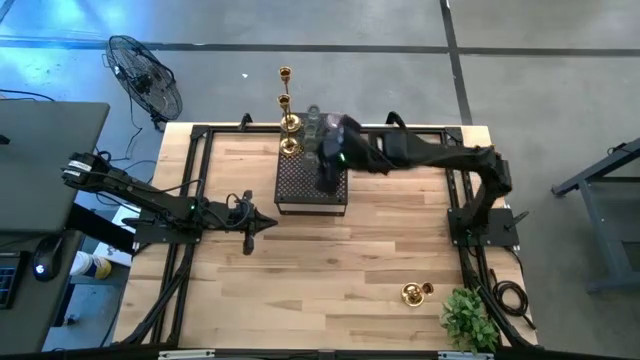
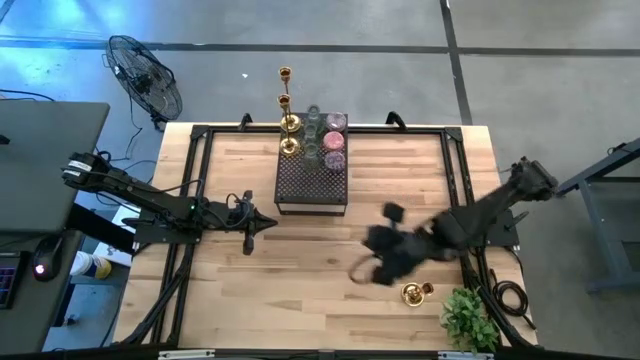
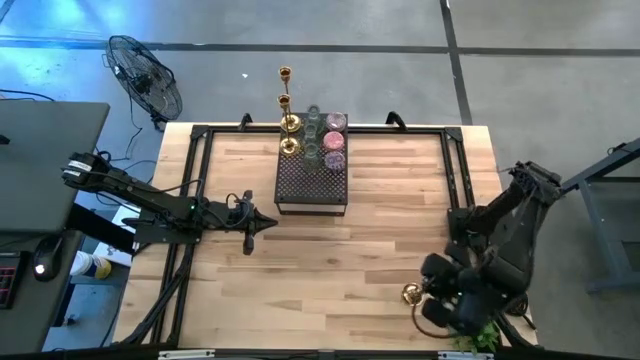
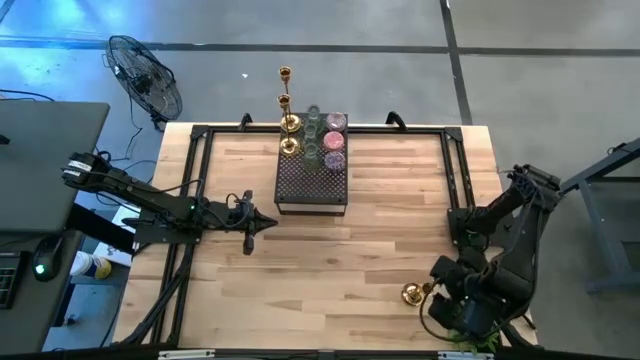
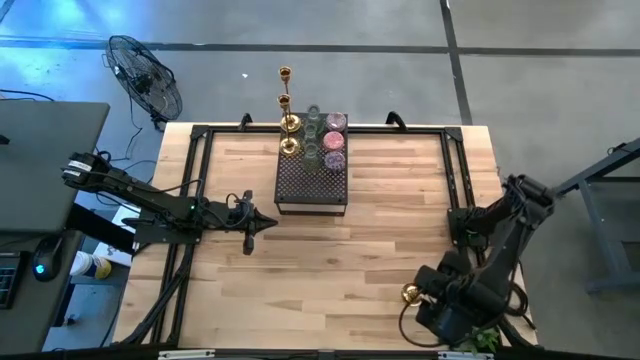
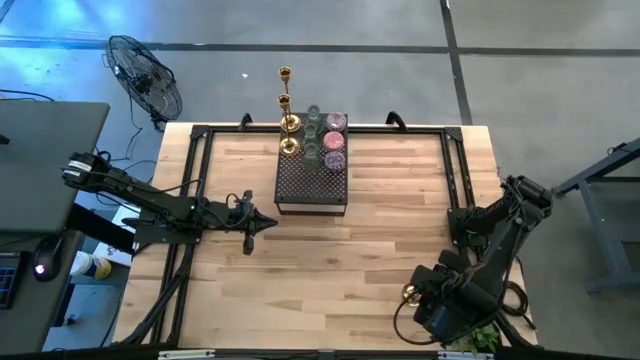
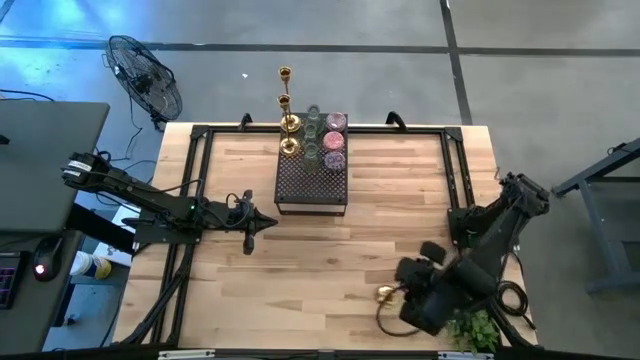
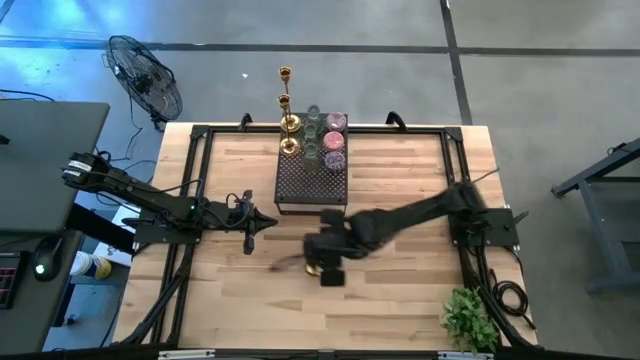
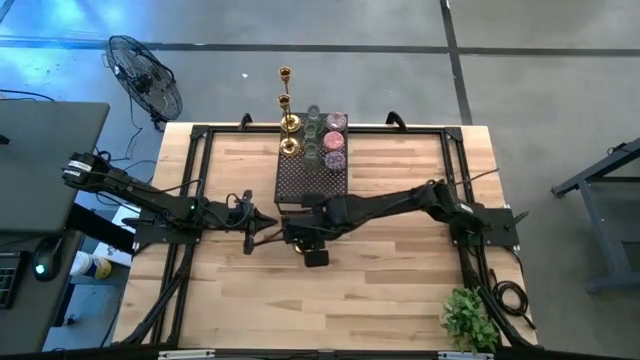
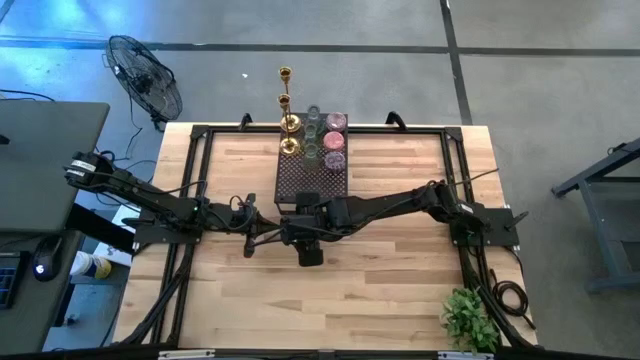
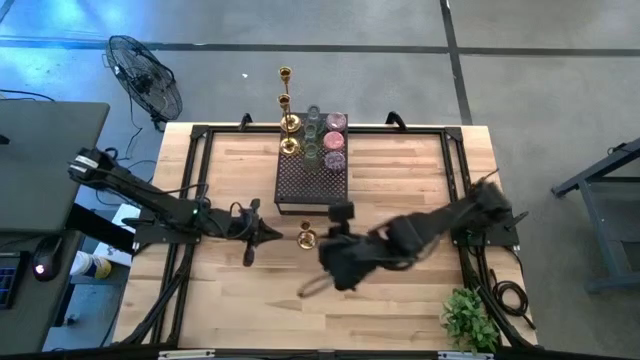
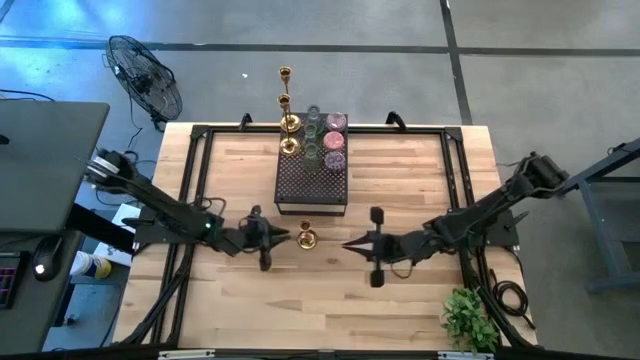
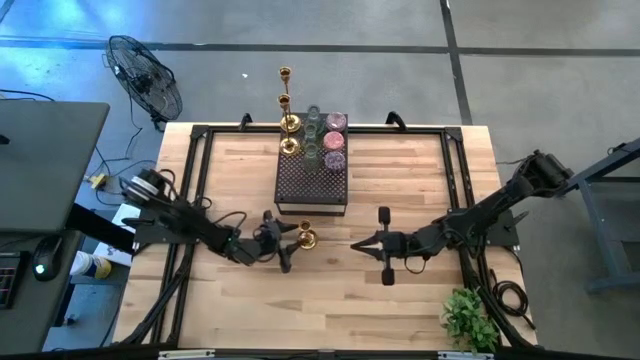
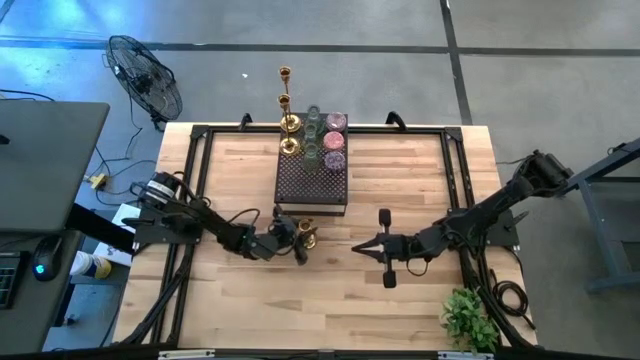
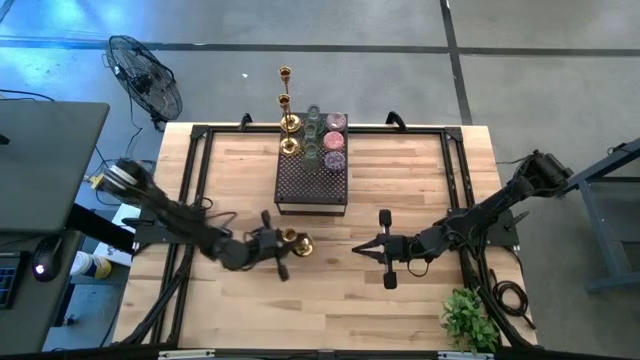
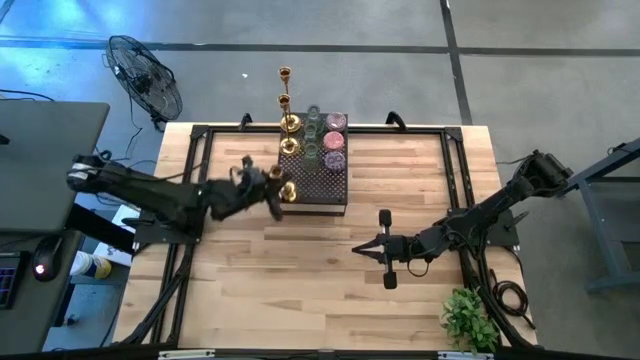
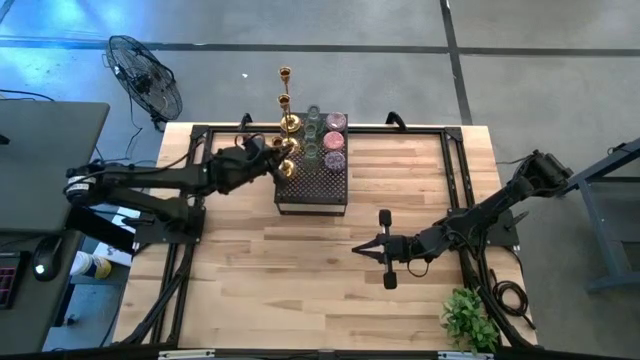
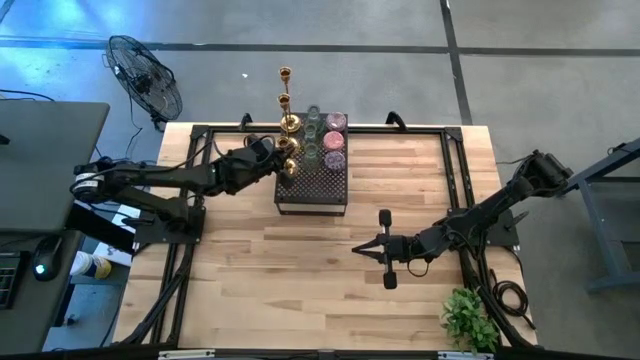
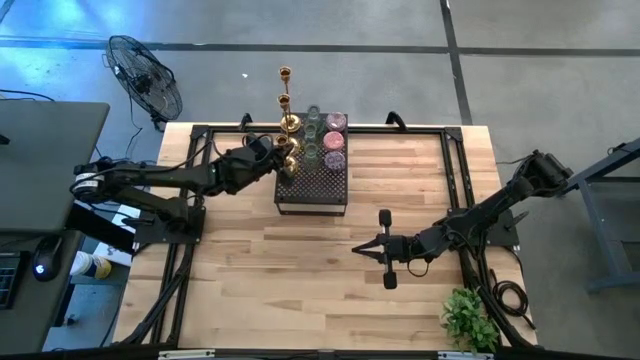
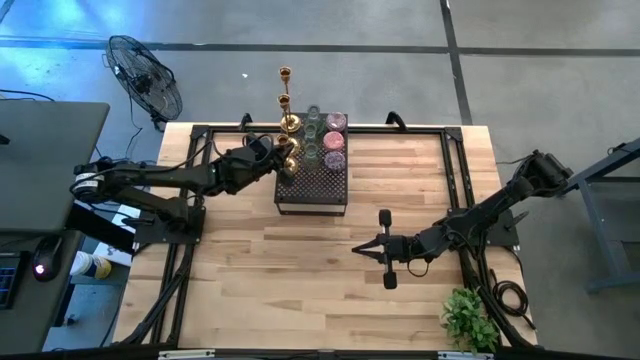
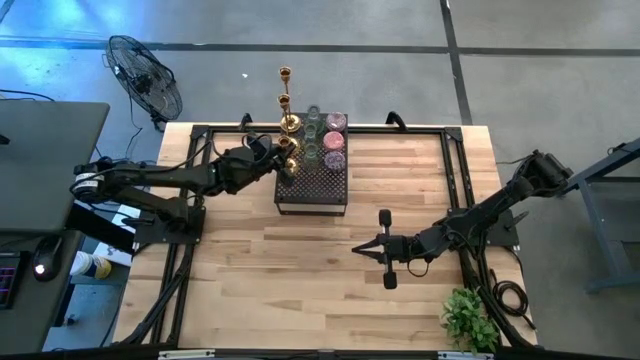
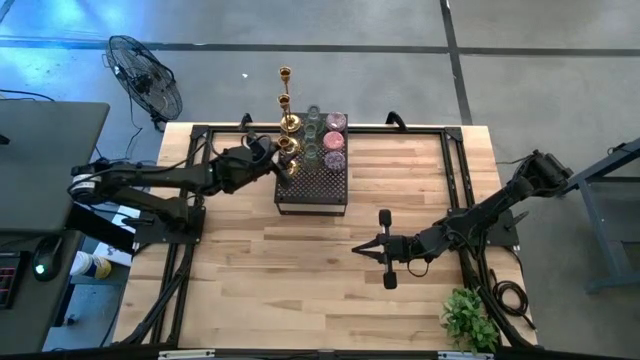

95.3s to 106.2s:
Task: Pick & Place candle stick holders
Put the gold candle holder on the shelf

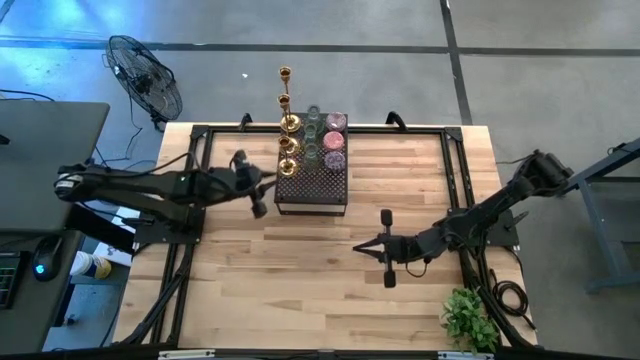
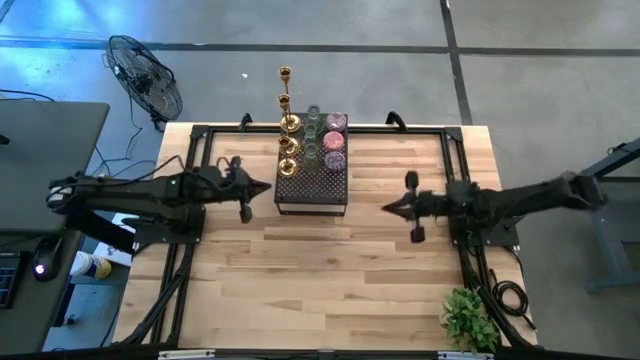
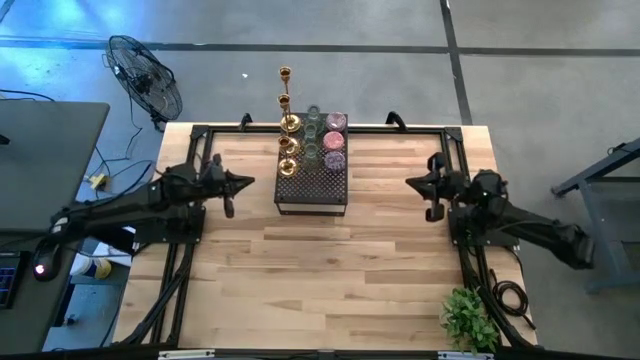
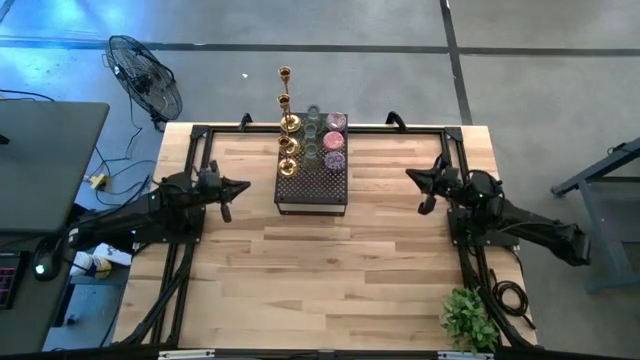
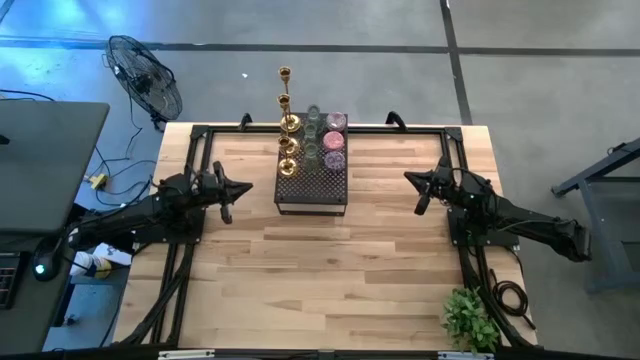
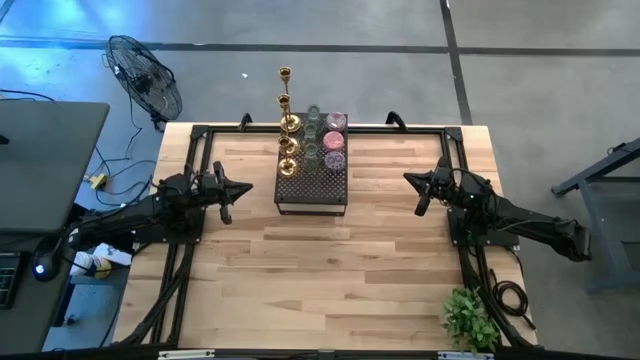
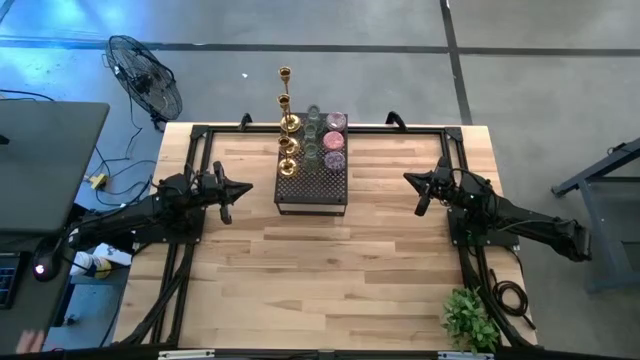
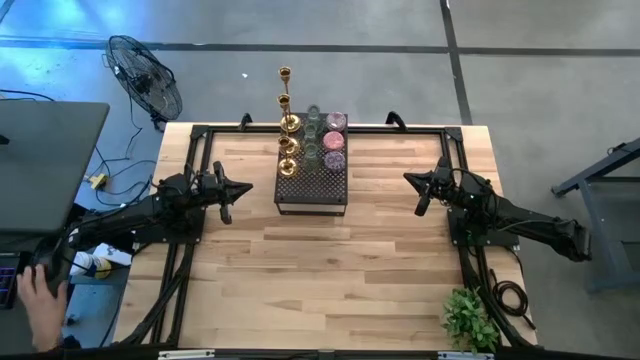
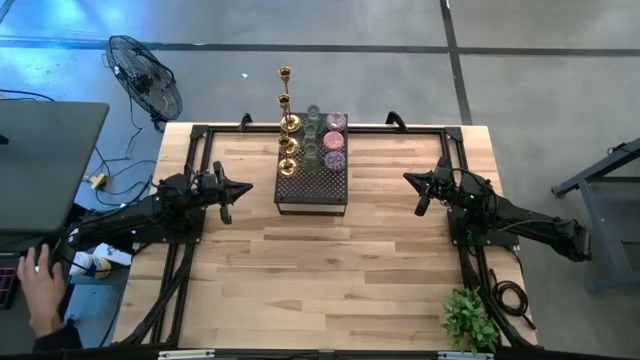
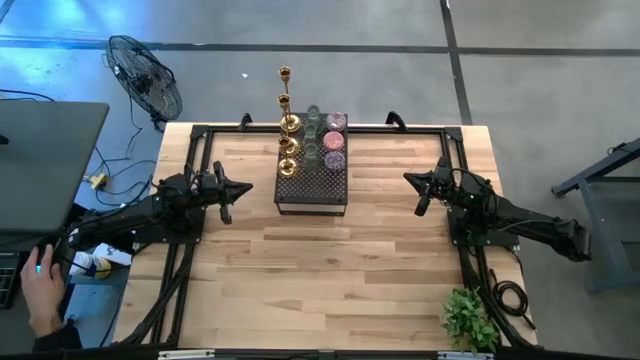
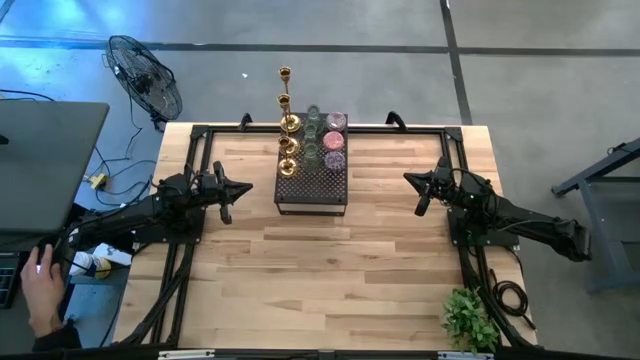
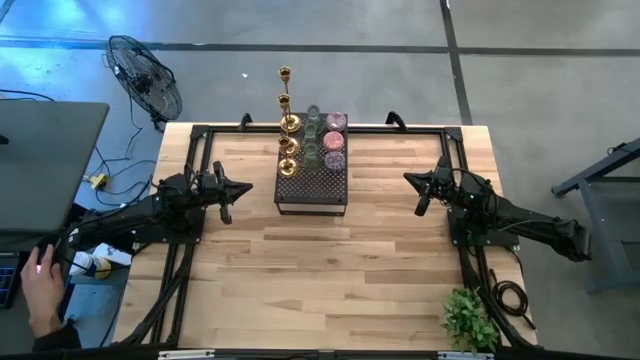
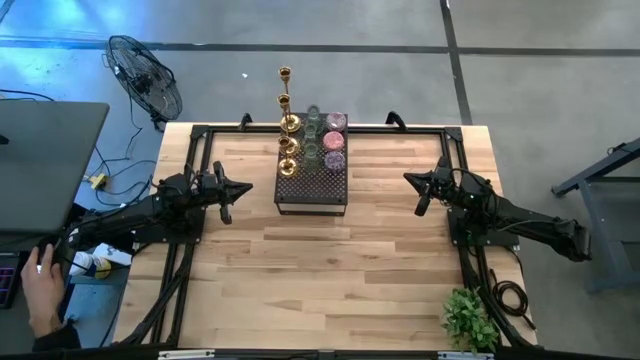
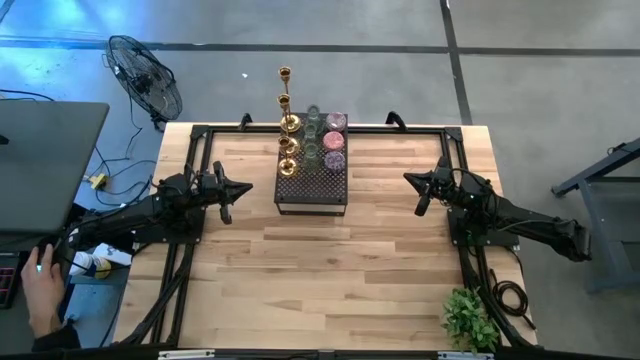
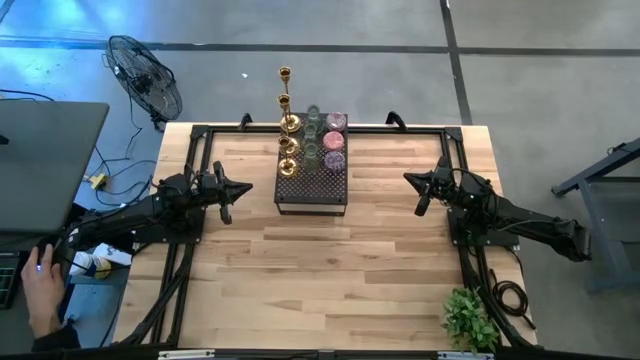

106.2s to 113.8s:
Return to Home Position

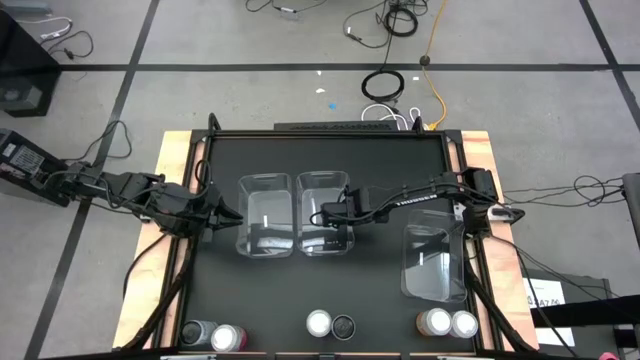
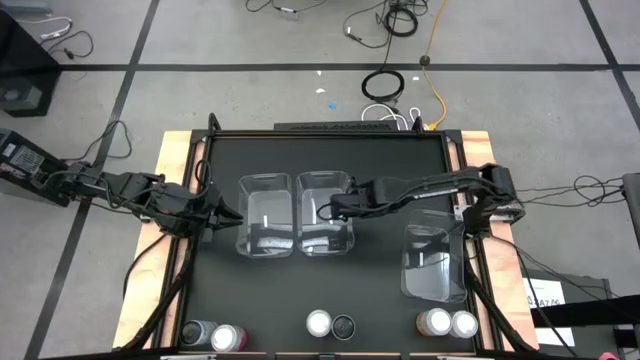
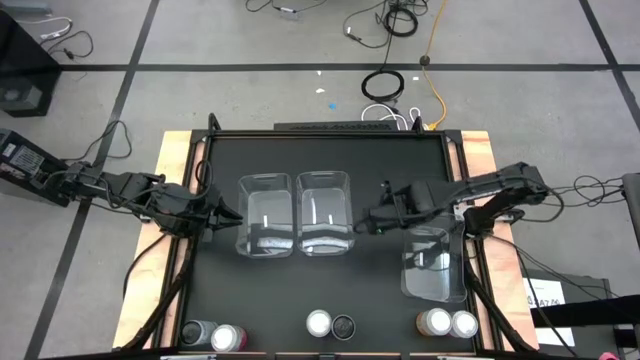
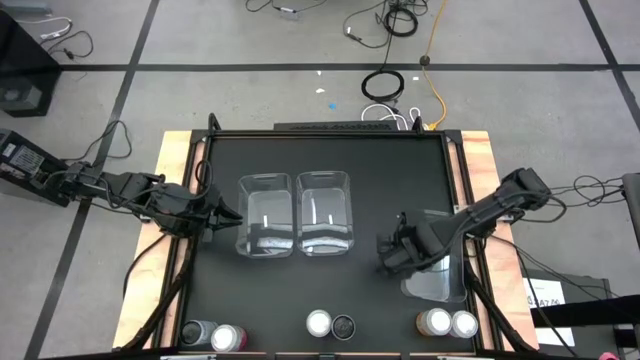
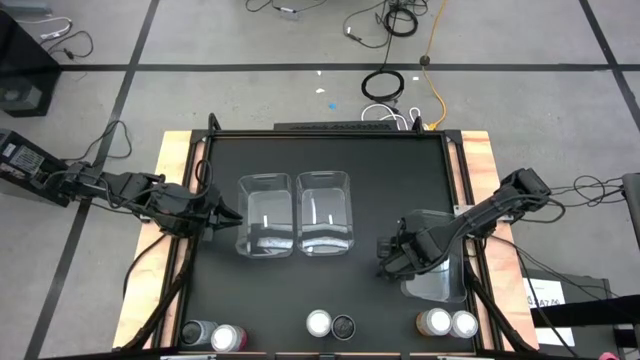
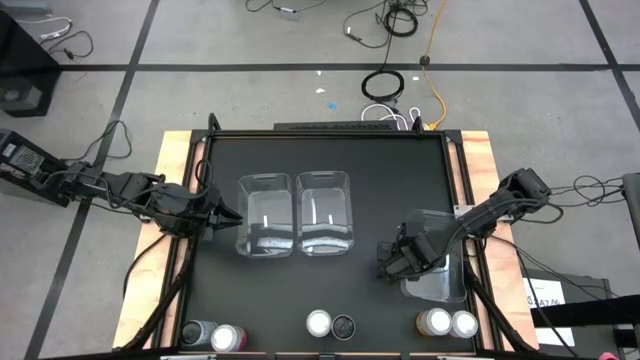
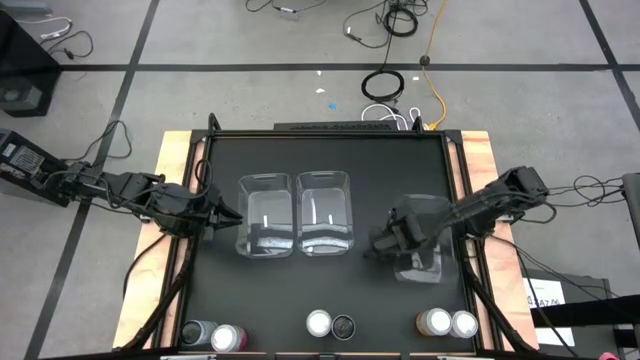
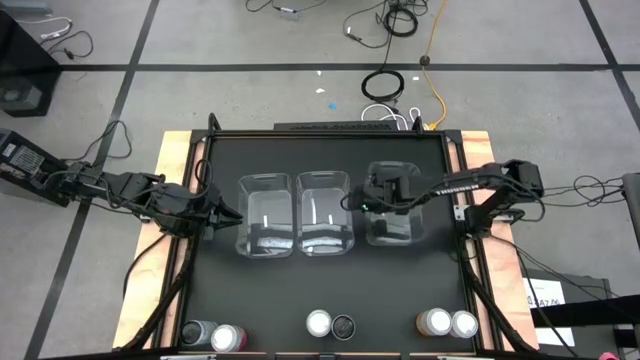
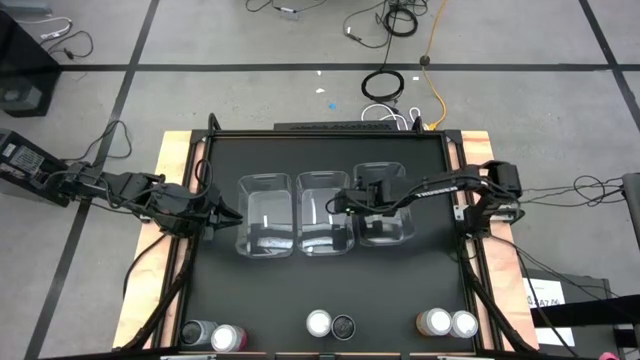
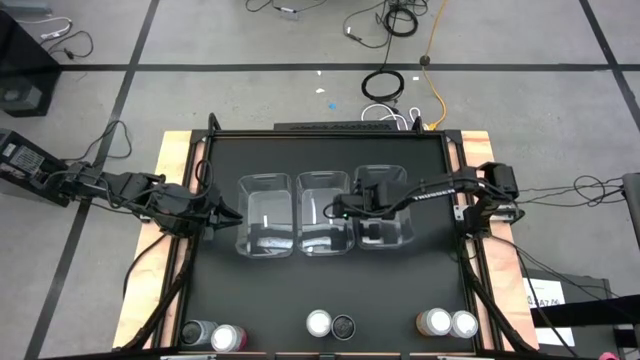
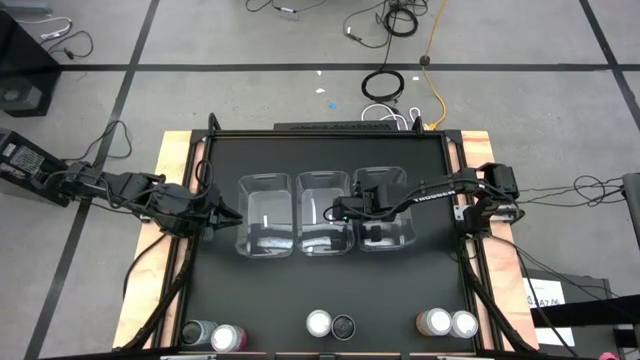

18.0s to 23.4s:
Task: Sort soda cans
Move the bottom right transparent bin to the middle right of the table
